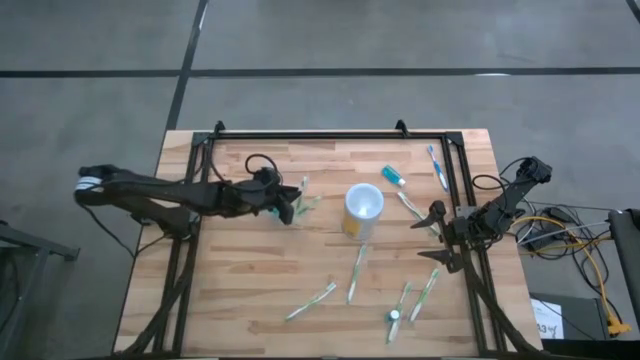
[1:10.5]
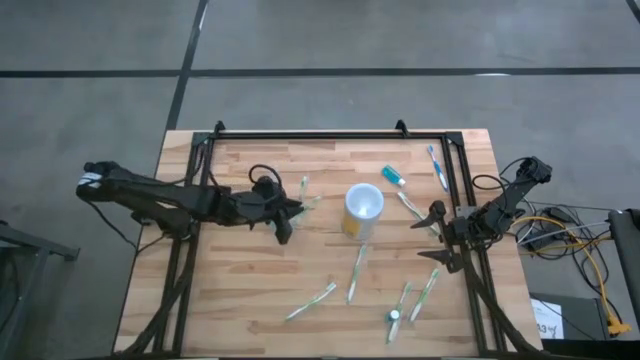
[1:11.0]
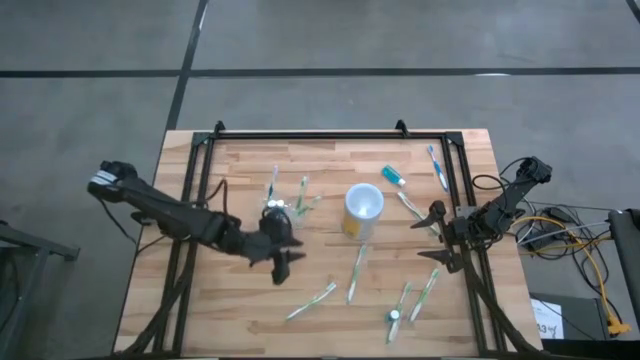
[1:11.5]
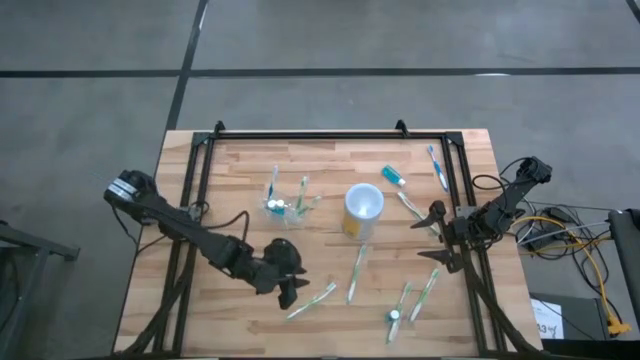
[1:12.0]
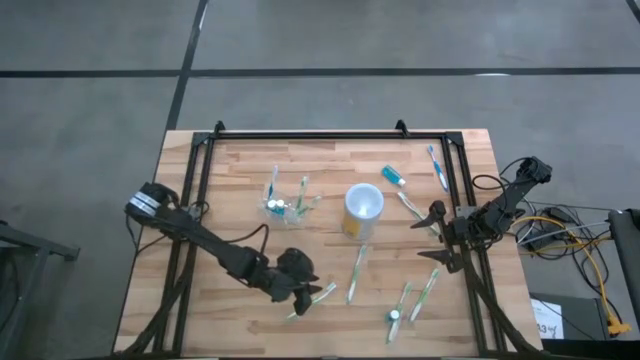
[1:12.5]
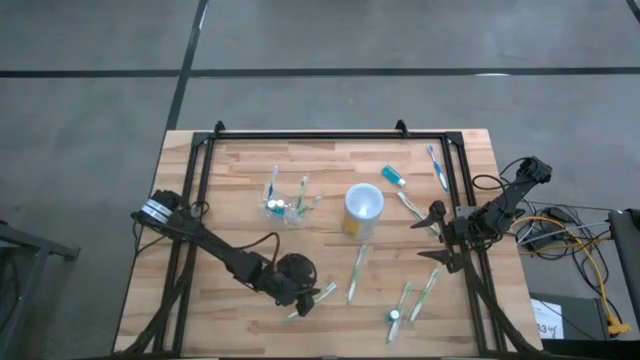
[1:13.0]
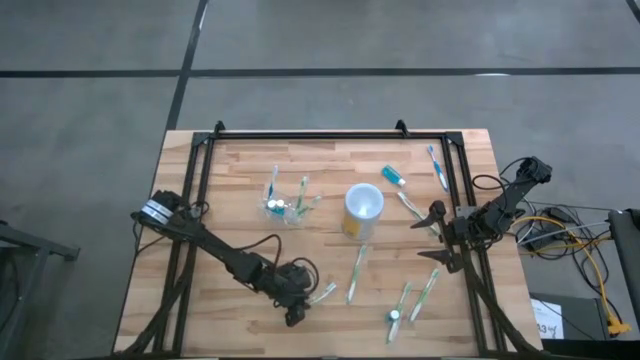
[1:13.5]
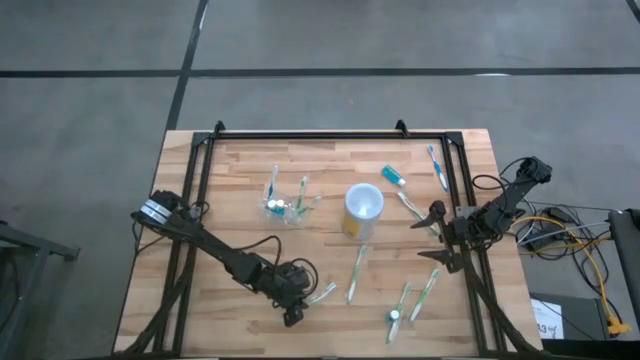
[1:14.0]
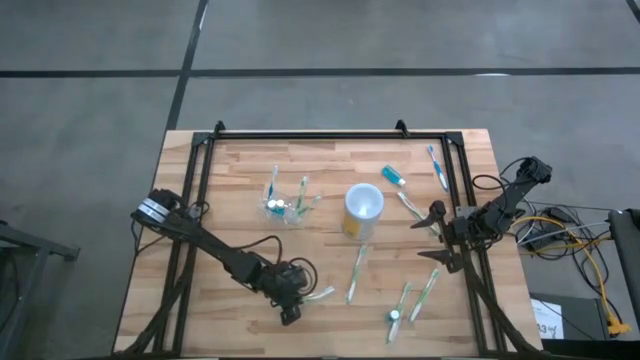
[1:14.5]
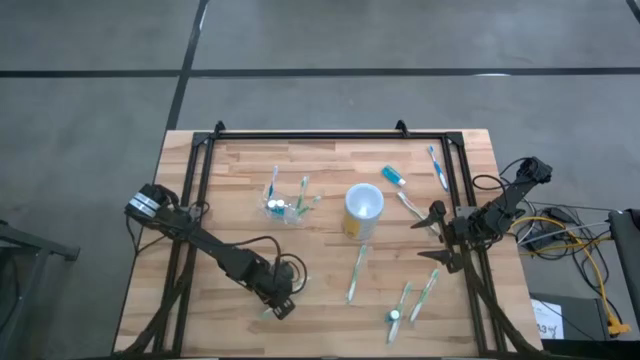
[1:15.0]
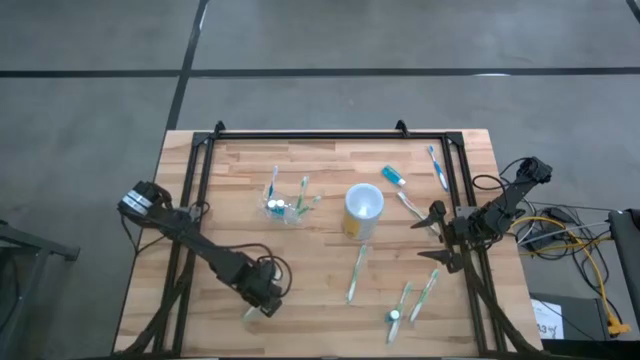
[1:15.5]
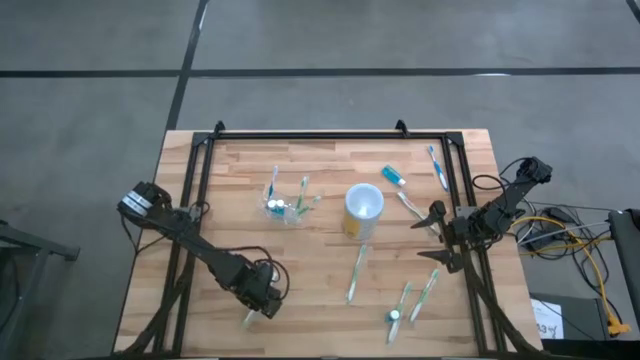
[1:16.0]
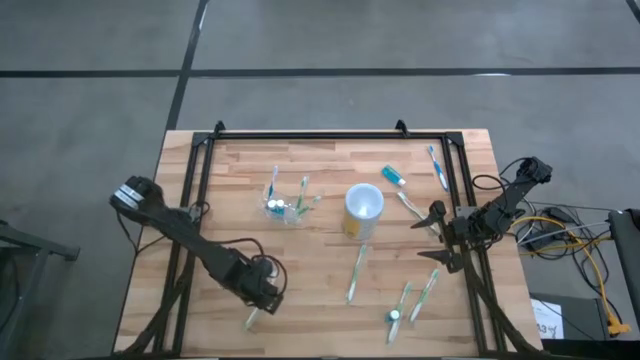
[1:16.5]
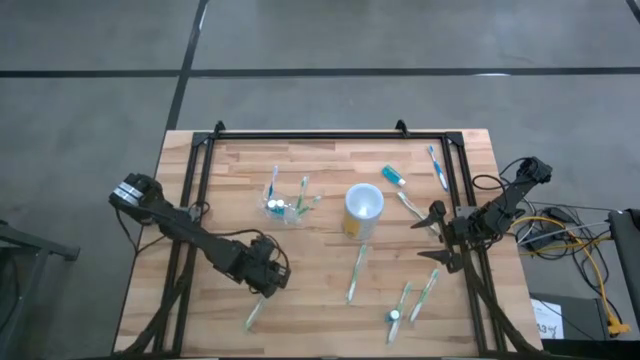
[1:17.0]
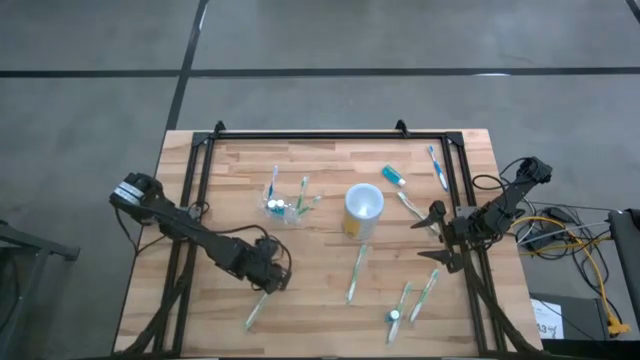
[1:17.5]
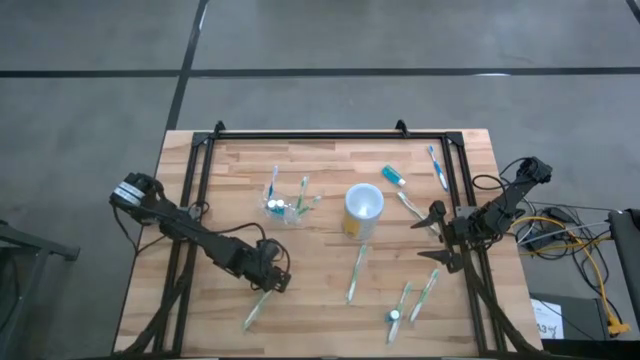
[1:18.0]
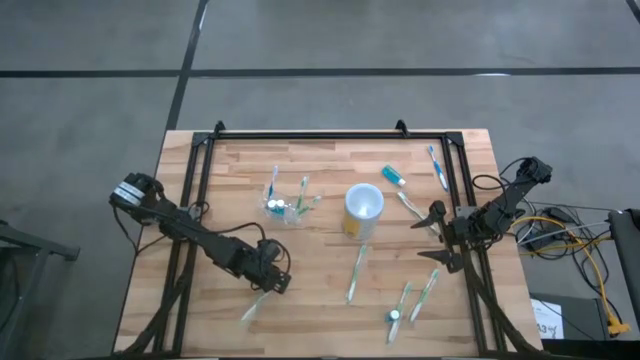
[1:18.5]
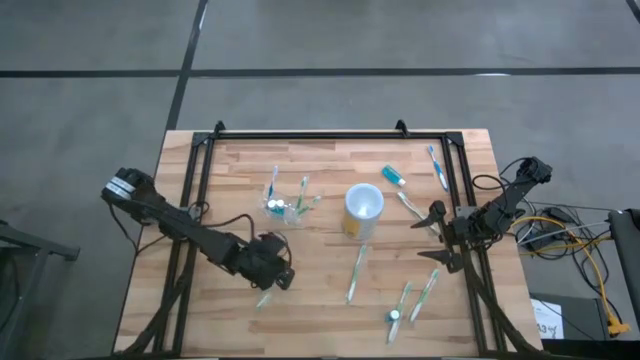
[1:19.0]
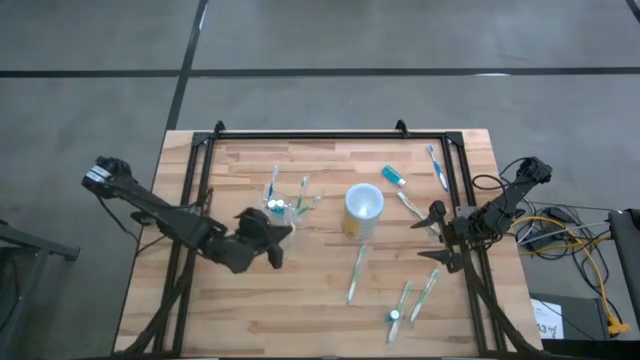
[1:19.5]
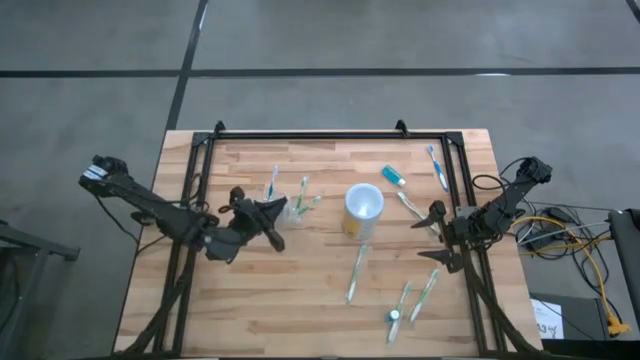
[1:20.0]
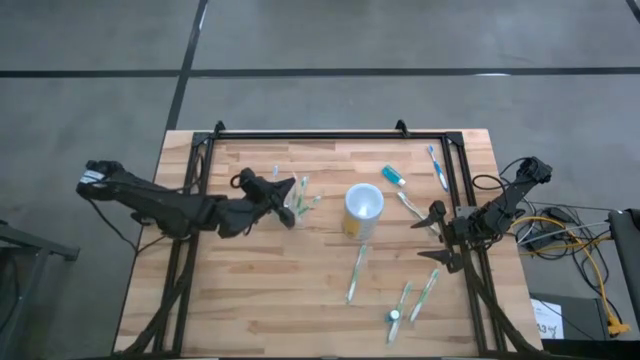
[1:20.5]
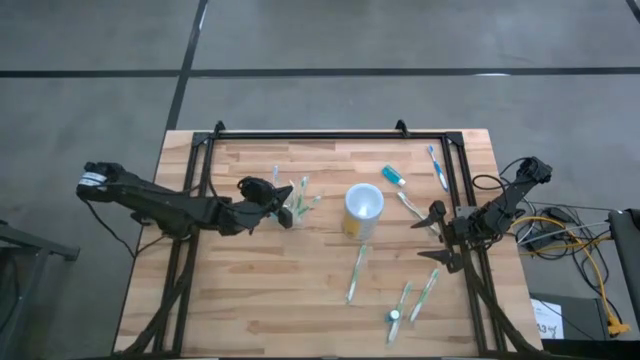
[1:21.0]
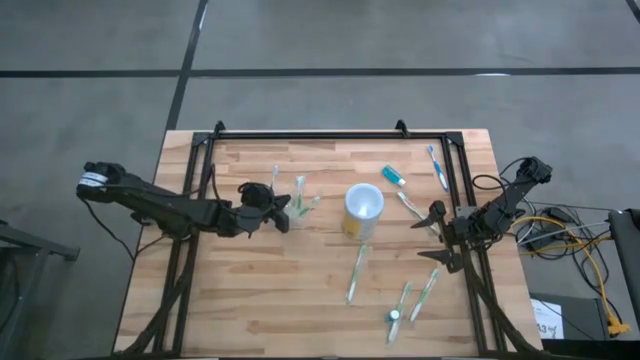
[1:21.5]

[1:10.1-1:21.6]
Task: Pick & Place toothbrushing station
Put the green toothbrush into the right section of the transparent organizer

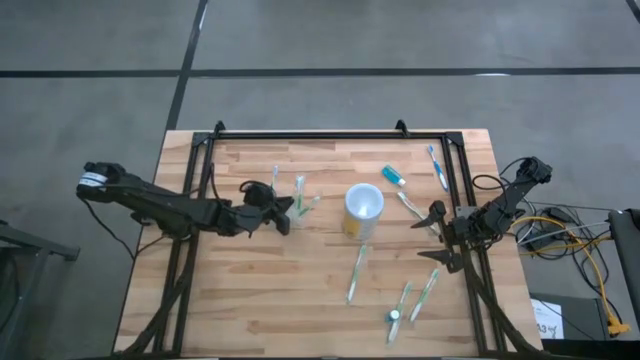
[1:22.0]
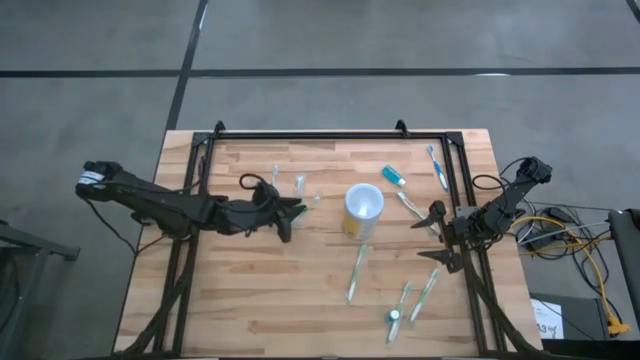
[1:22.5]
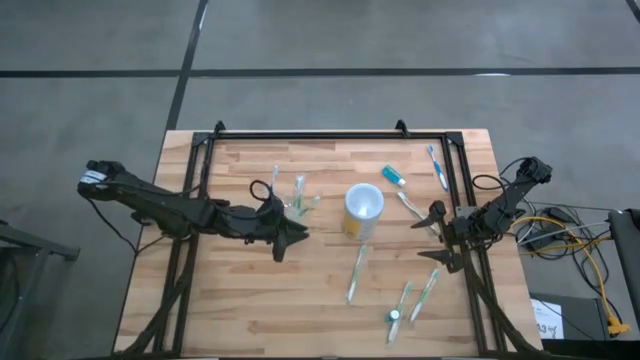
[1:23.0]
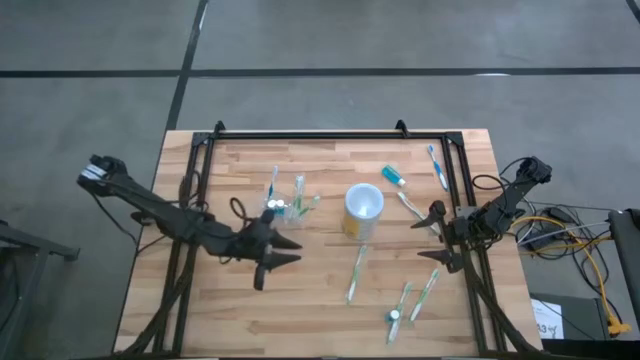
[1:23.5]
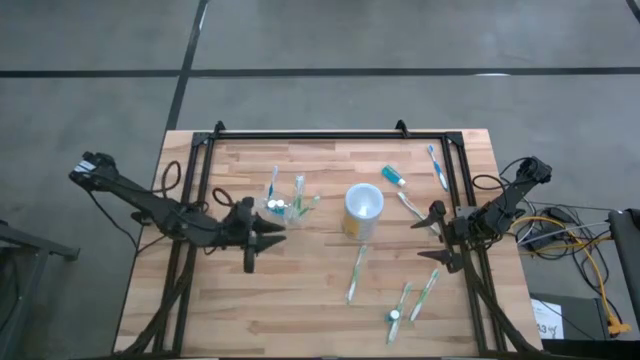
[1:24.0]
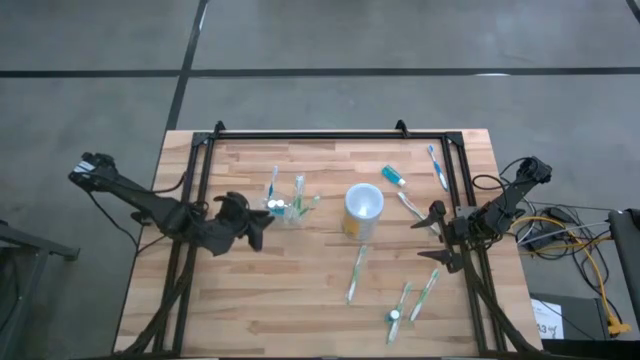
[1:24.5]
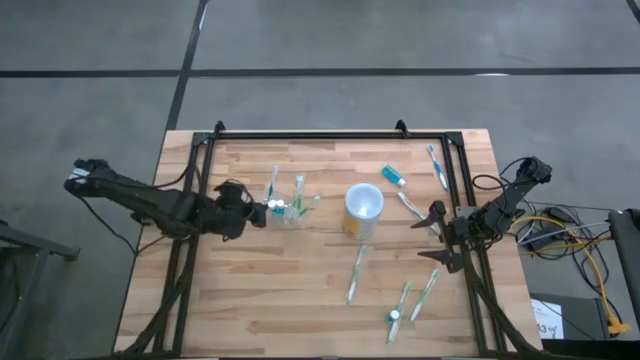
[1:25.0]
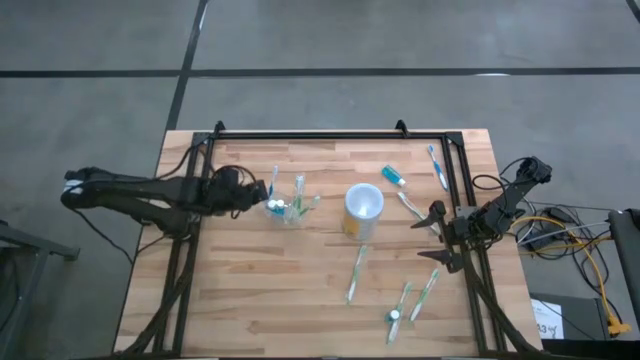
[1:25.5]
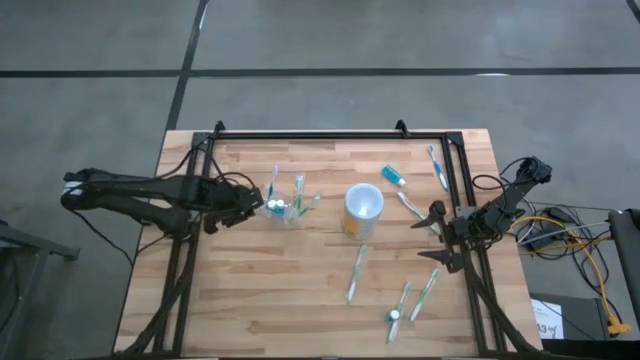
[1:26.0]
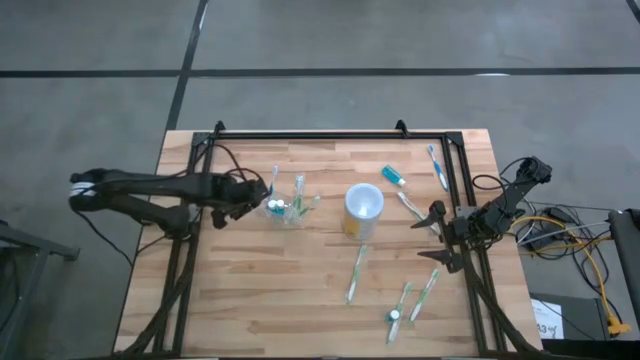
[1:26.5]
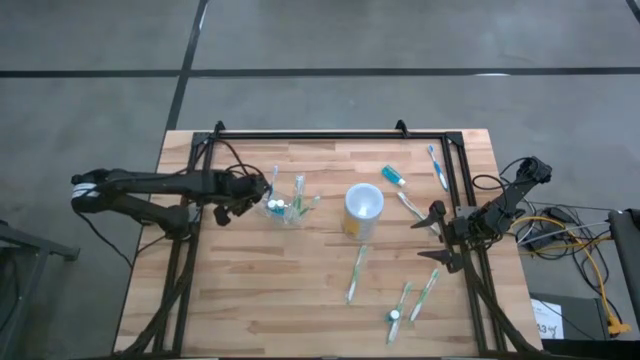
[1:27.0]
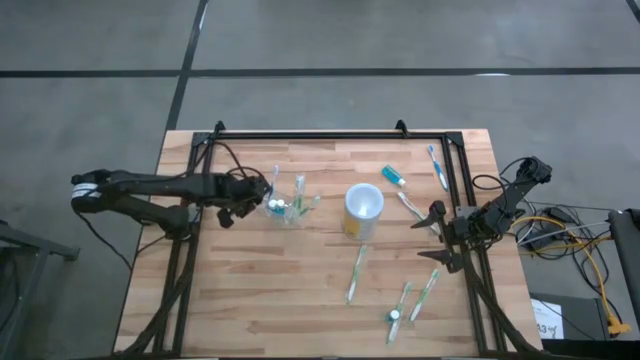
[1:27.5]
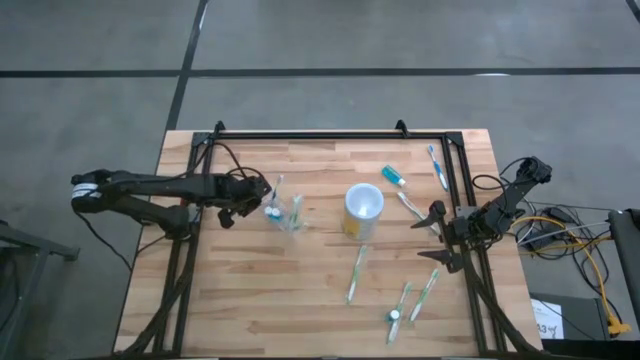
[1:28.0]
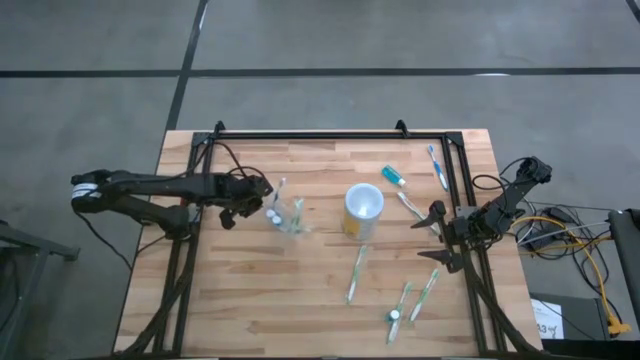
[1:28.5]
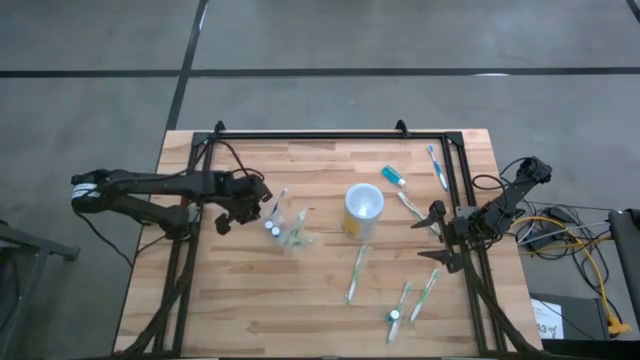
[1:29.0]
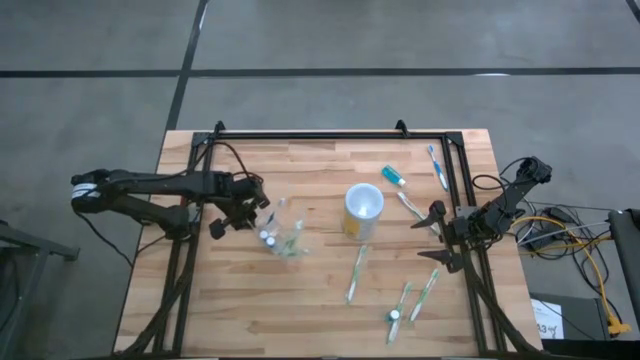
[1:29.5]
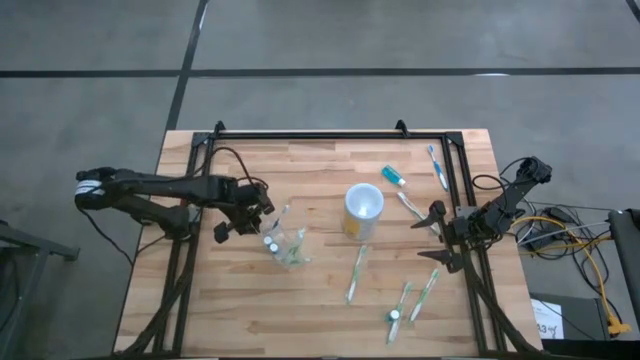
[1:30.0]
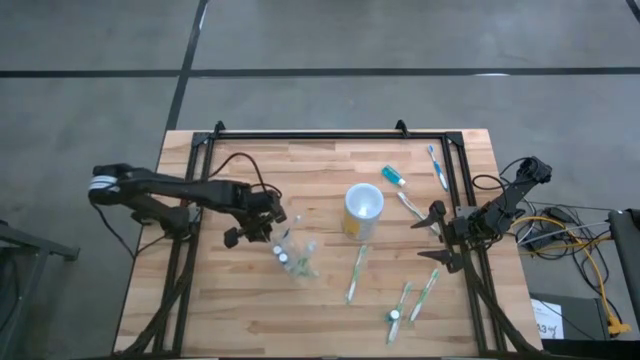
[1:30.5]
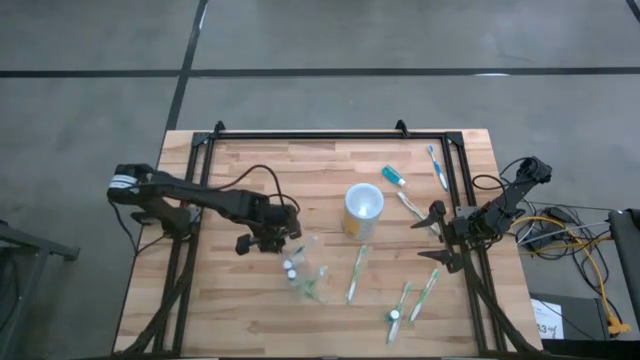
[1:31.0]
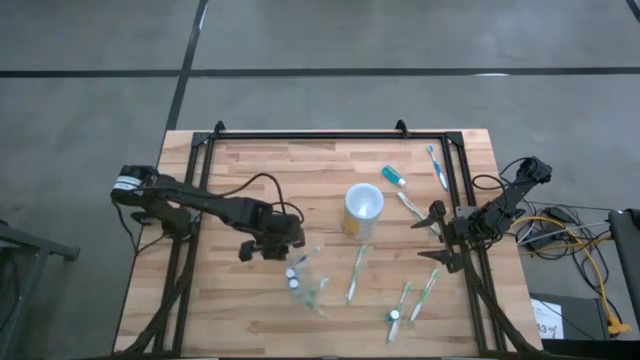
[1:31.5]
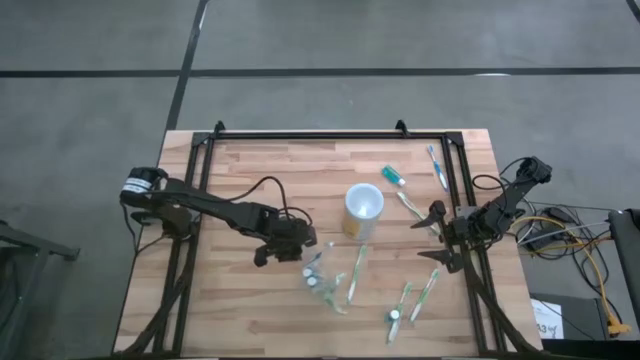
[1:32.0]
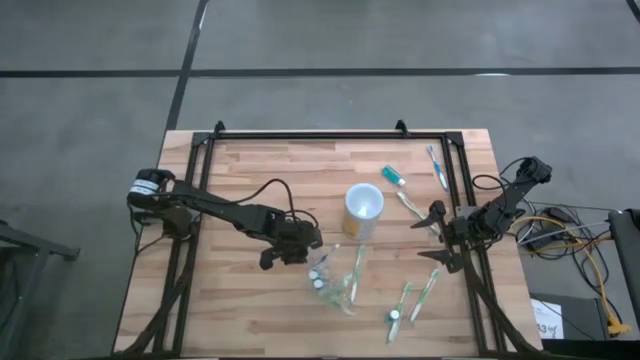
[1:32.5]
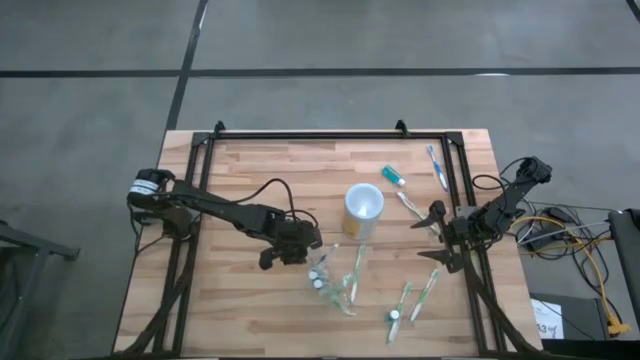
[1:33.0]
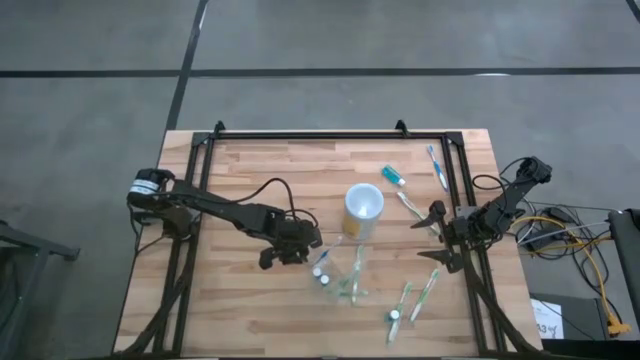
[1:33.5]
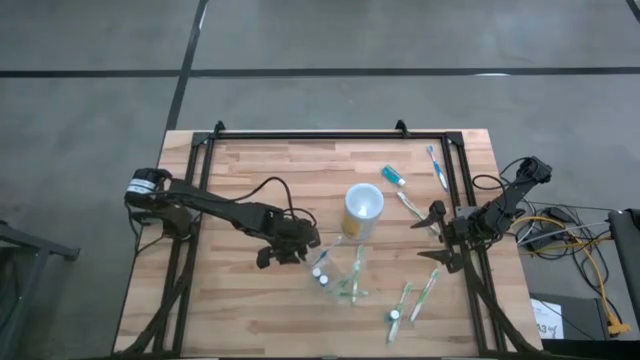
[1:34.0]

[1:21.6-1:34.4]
Move the transparent organizer to the center of the table
